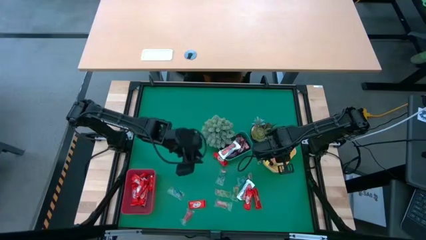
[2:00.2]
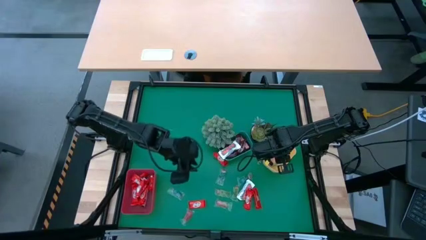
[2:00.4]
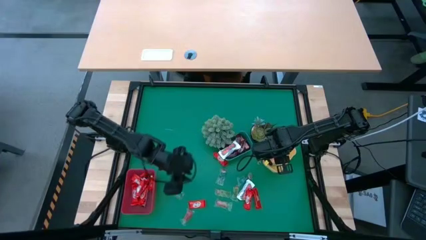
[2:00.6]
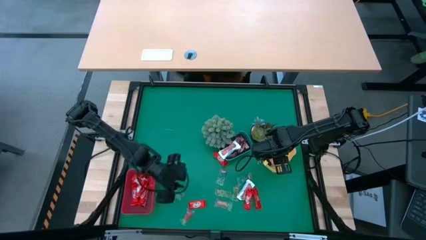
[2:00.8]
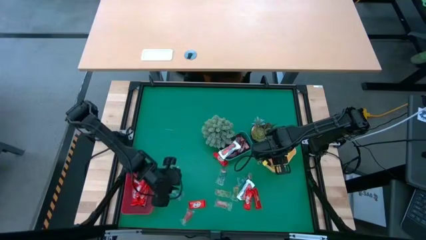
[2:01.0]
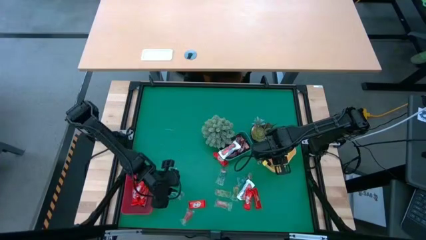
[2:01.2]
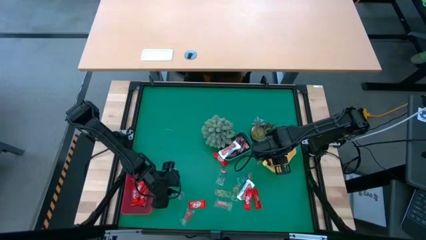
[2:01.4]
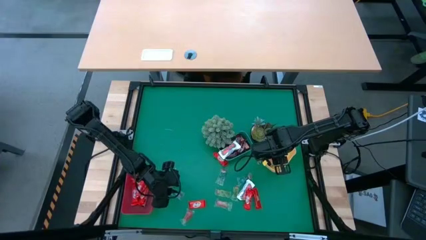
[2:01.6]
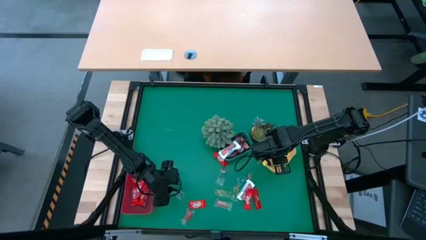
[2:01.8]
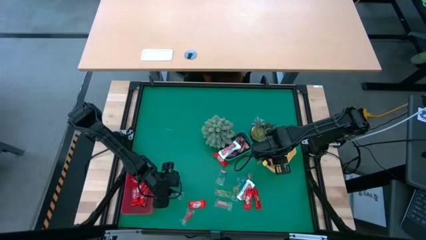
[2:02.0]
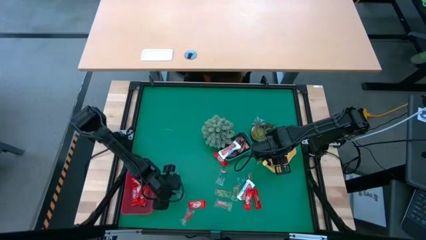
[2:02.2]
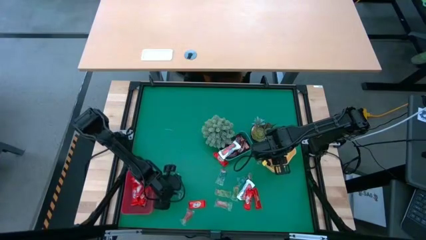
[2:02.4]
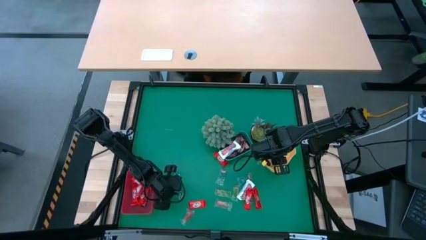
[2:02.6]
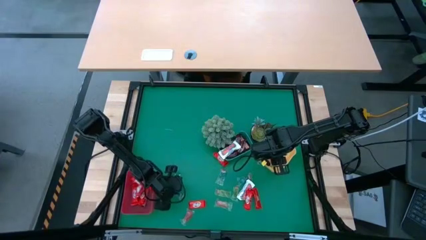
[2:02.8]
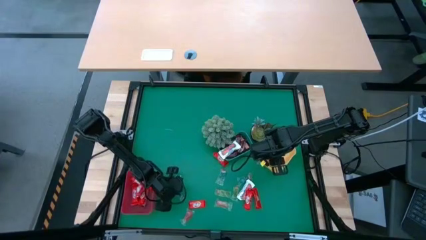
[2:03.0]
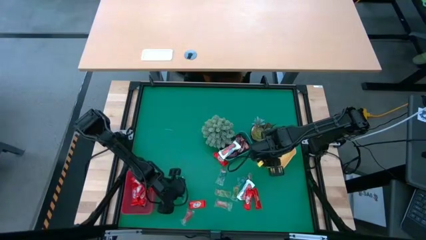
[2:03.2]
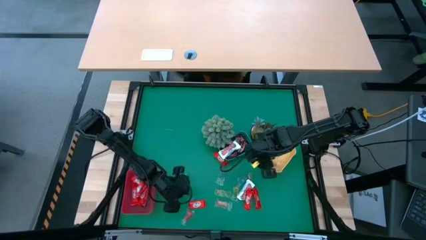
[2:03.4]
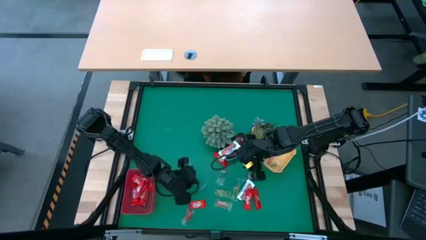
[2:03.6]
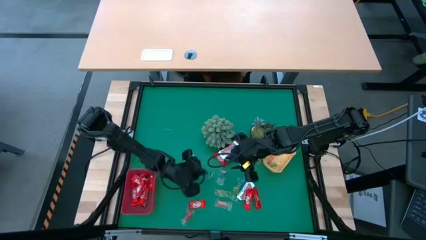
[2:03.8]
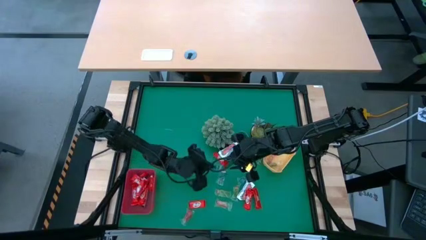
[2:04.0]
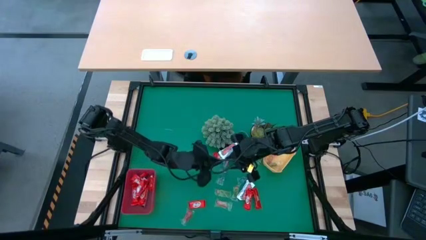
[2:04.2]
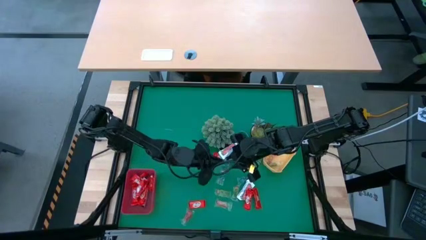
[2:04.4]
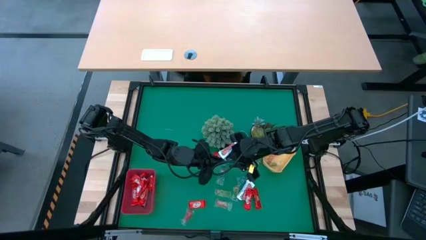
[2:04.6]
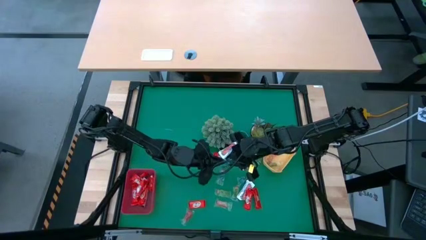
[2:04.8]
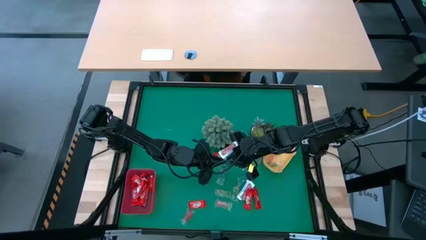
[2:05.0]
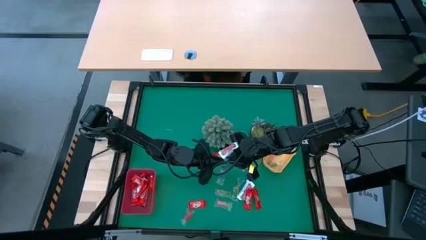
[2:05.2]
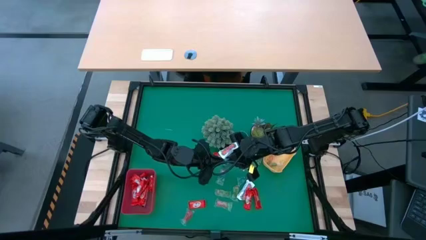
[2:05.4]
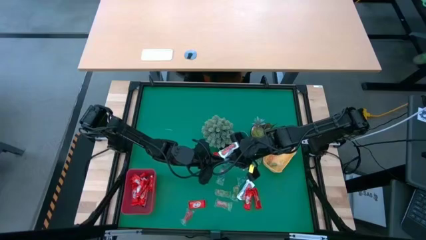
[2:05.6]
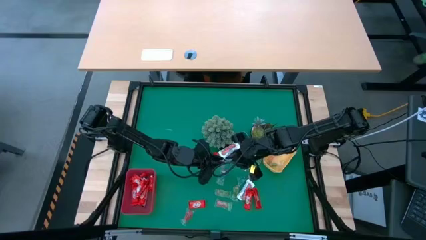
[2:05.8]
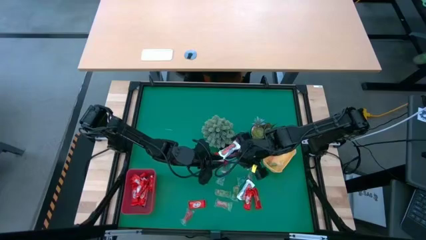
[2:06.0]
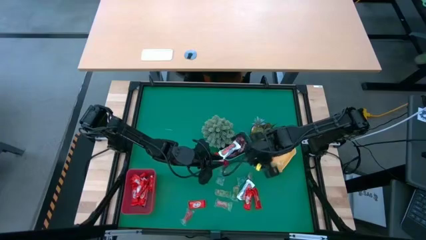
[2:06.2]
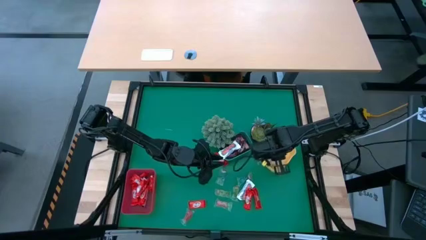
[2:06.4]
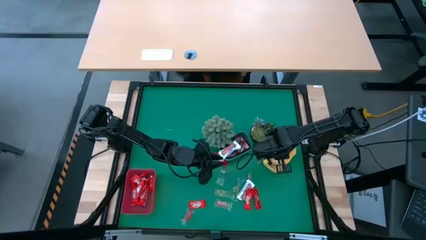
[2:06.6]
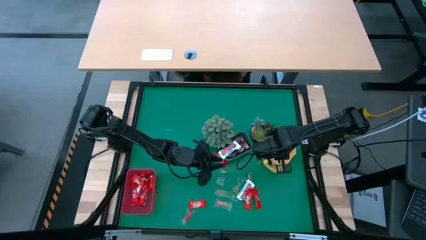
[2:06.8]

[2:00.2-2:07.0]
Task: Organize candy in baskets
Put the blue gummy into the yellow bin

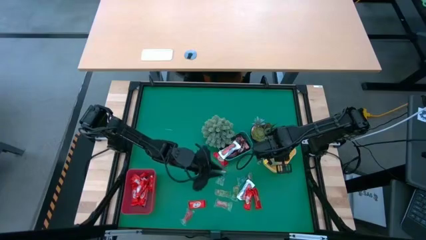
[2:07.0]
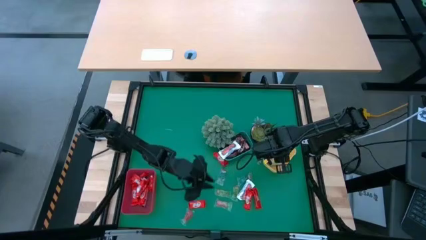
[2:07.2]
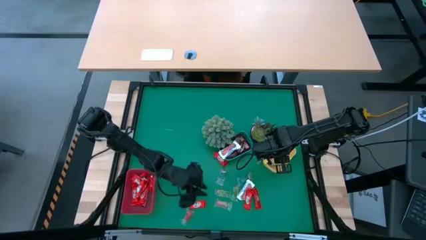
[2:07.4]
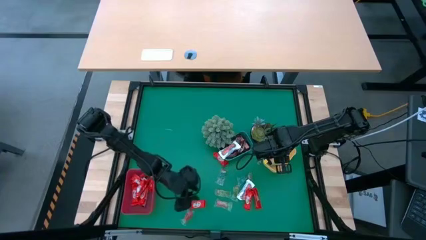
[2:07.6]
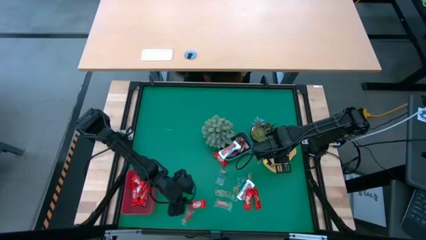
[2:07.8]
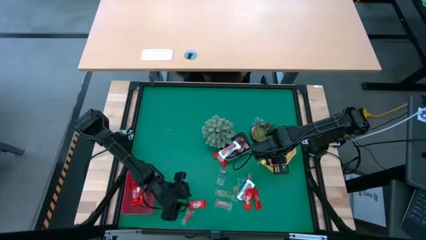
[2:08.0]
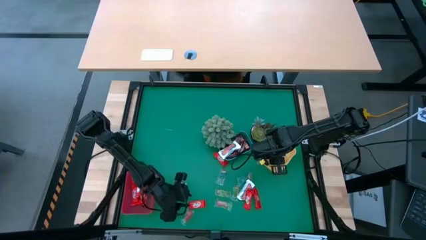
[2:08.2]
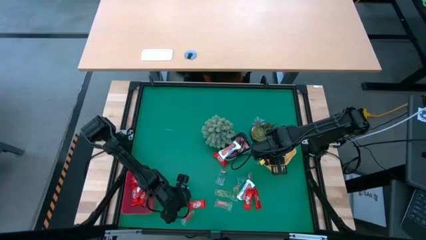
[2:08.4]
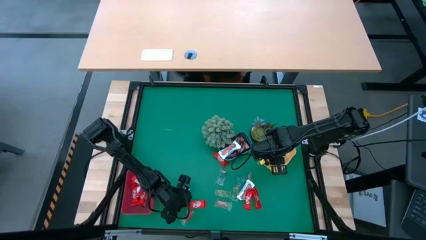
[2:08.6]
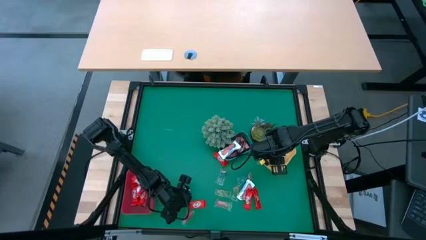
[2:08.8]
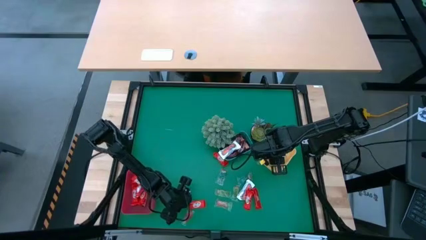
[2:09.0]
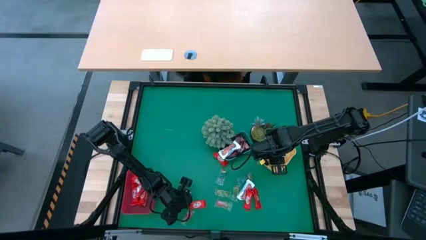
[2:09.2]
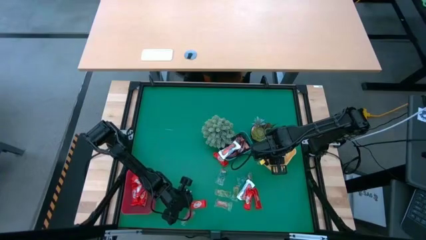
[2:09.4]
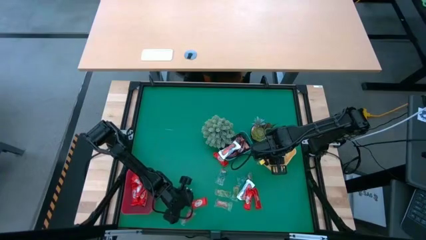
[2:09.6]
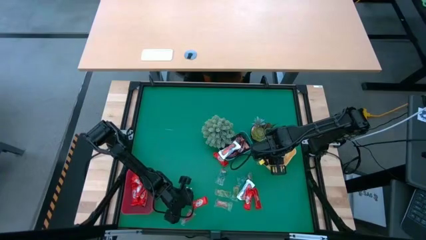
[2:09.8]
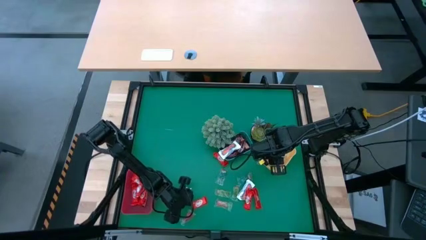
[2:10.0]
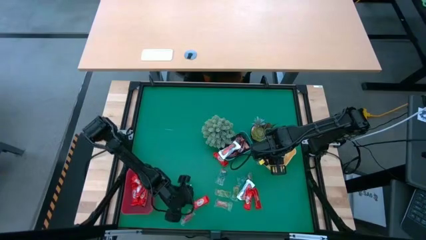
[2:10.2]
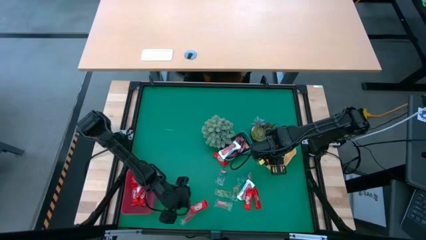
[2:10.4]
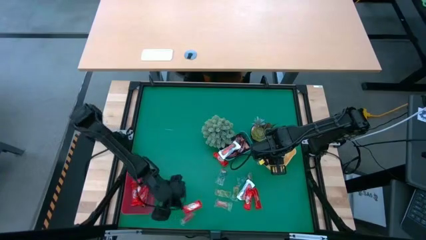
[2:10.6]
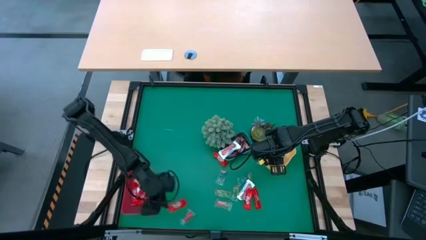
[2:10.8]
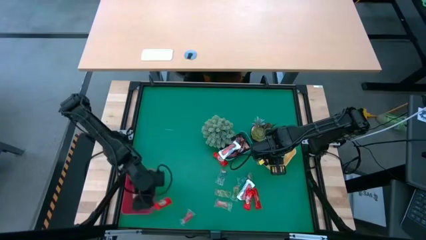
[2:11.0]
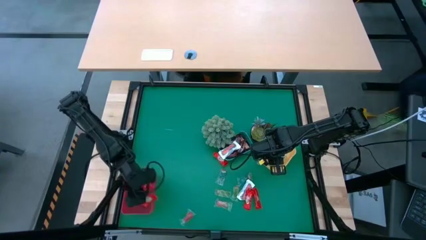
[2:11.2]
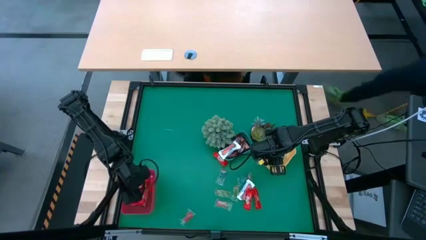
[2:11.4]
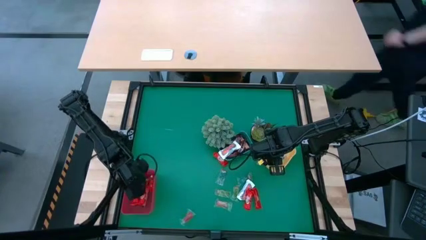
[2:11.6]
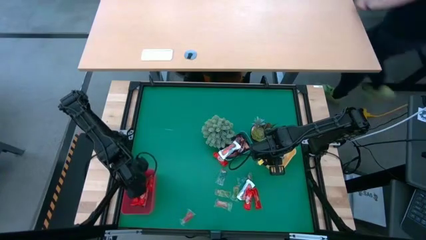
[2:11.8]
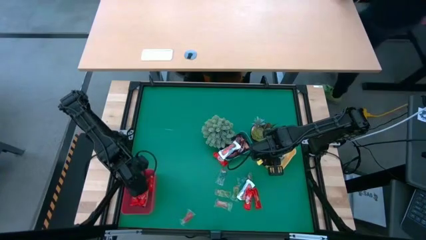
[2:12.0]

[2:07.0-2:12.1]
Put the red chocolate into the red bin

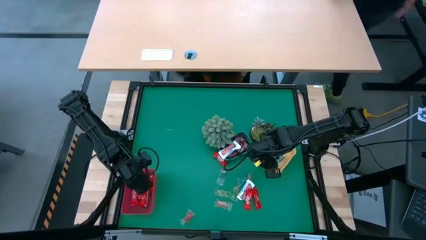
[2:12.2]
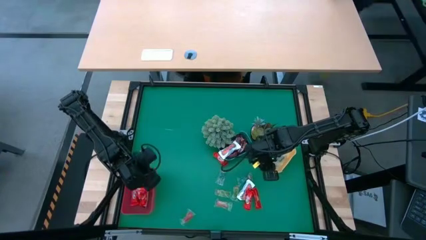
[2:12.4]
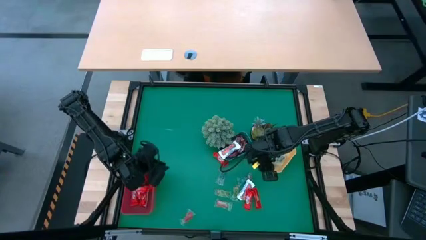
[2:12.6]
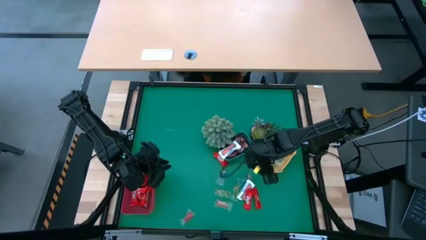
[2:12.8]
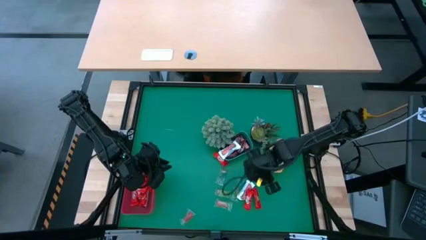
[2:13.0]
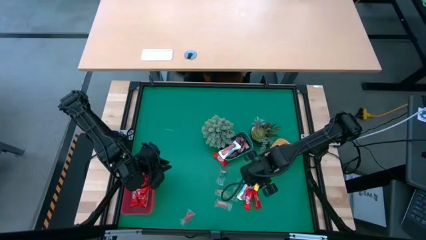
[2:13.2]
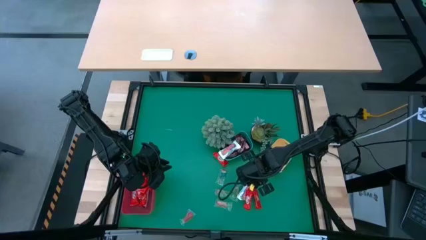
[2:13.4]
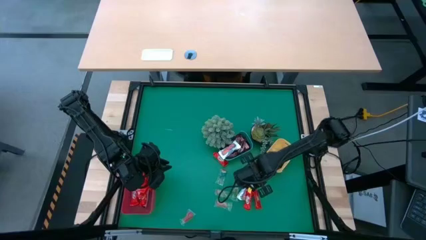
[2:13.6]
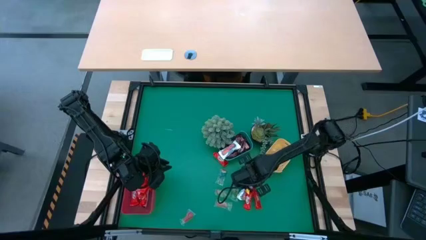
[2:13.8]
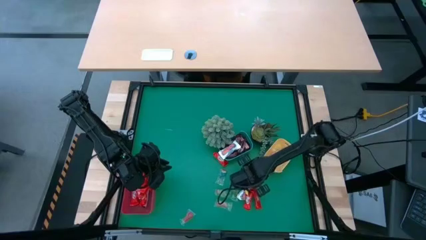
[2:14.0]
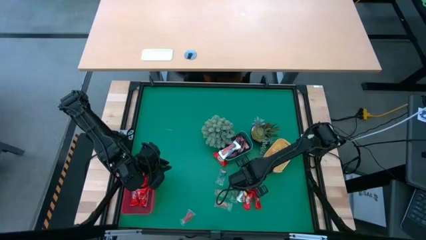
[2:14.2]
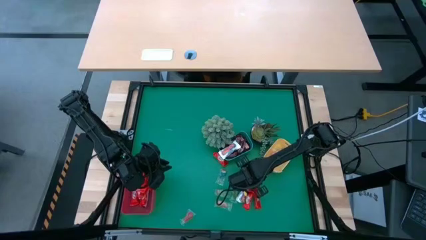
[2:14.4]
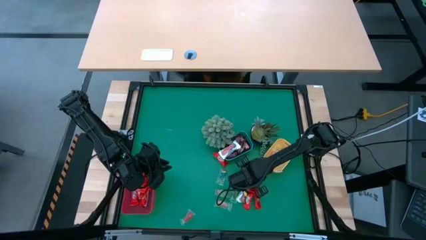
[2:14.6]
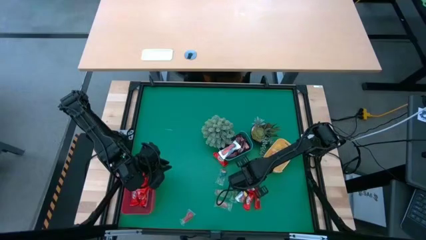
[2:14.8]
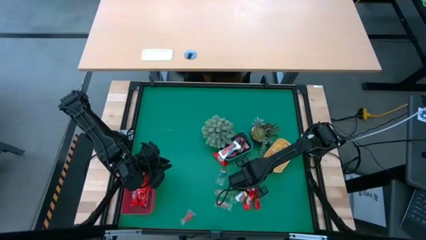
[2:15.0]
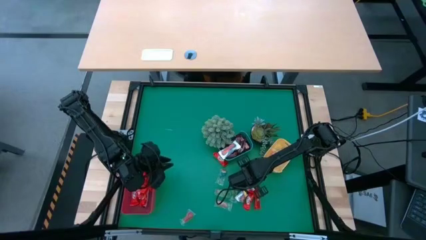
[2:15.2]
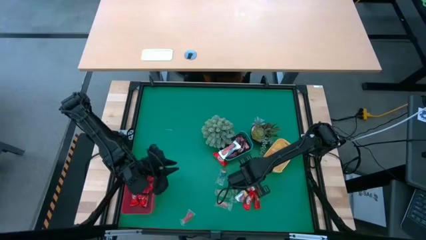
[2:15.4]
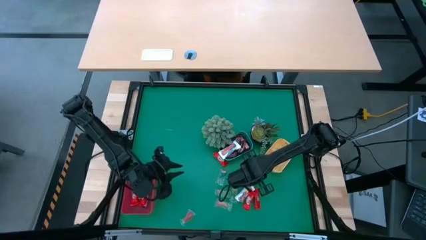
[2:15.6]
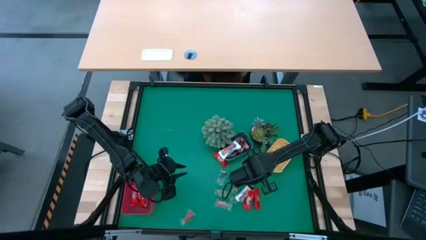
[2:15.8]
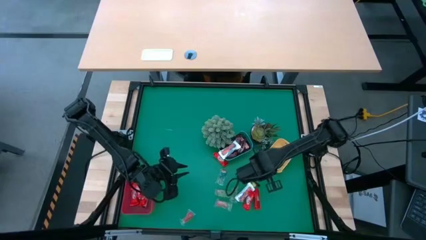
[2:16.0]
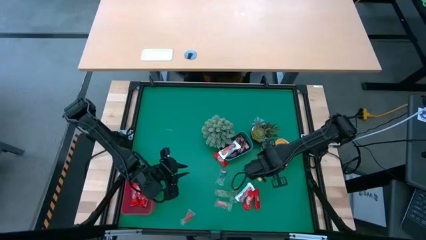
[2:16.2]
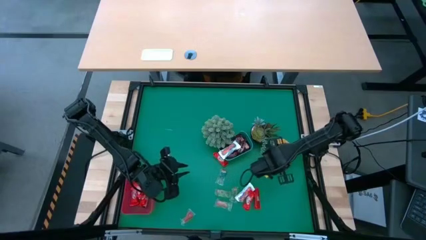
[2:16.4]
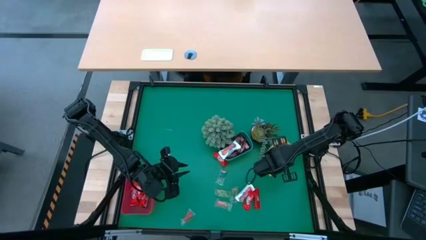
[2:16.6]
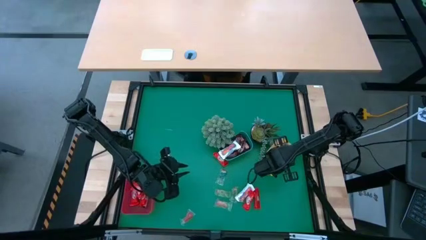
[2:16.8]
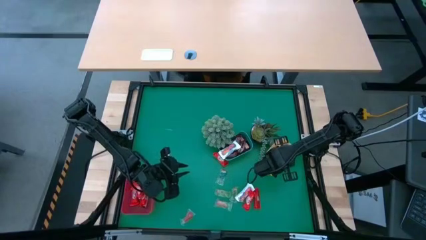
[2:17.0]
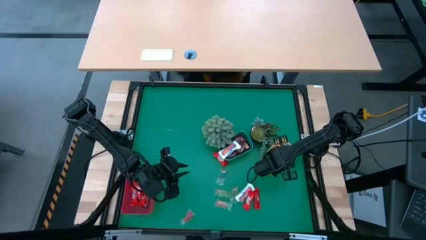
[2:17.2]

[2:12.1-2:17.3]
Put the blue gummy into the yellow bin
